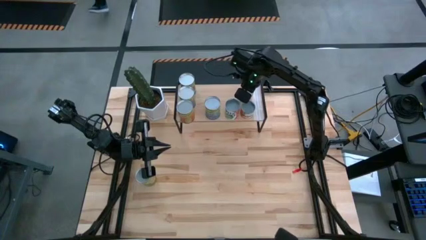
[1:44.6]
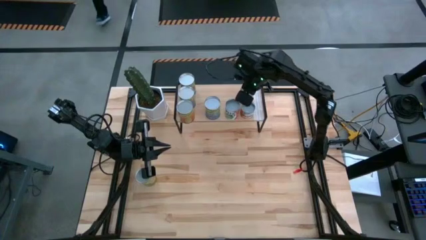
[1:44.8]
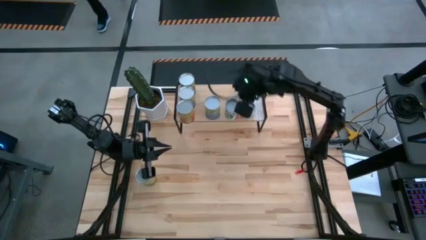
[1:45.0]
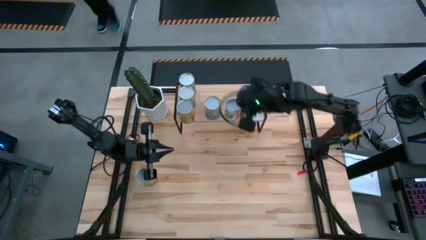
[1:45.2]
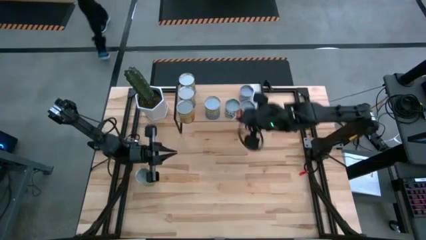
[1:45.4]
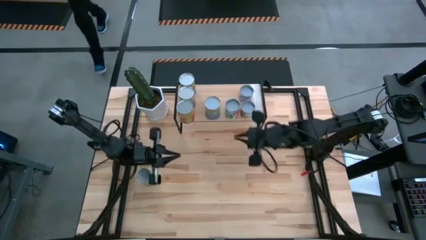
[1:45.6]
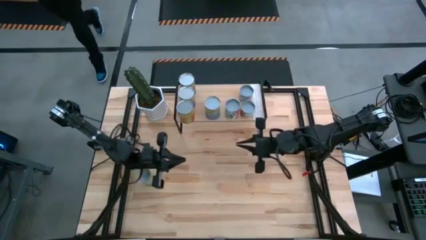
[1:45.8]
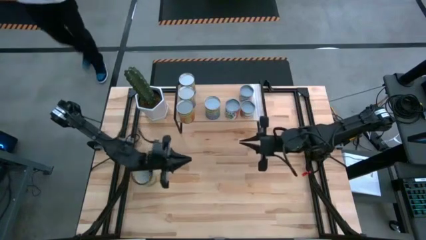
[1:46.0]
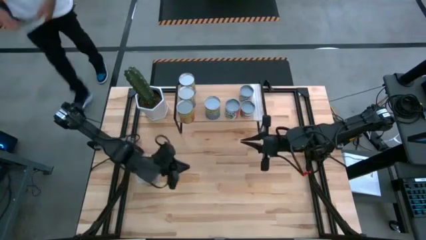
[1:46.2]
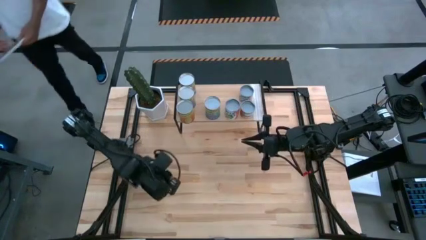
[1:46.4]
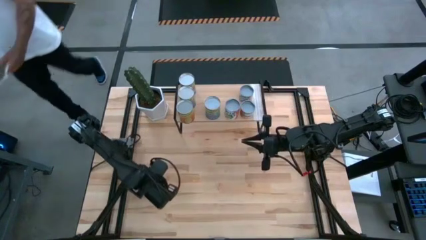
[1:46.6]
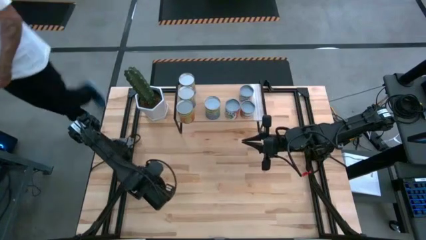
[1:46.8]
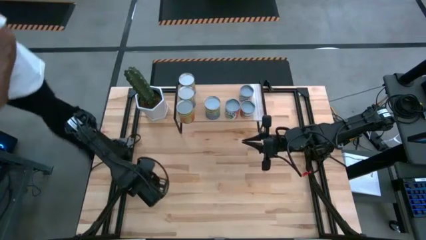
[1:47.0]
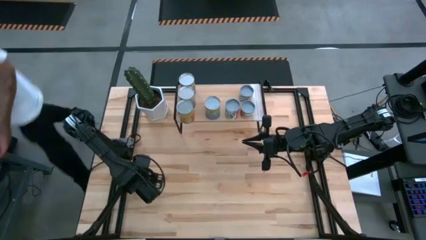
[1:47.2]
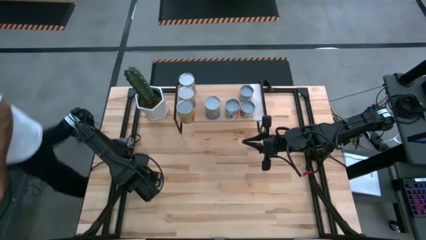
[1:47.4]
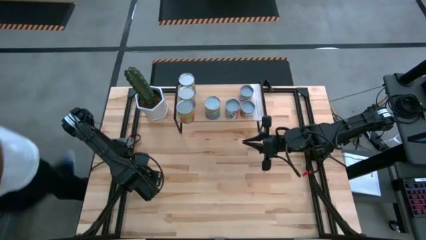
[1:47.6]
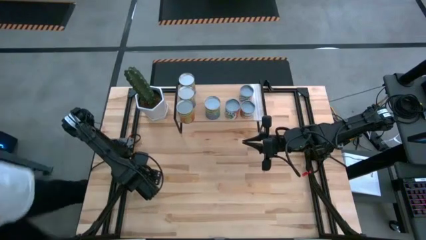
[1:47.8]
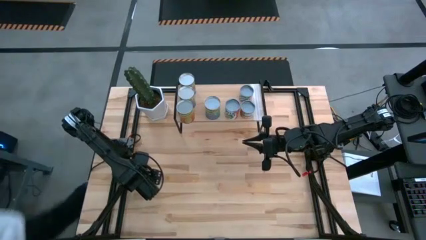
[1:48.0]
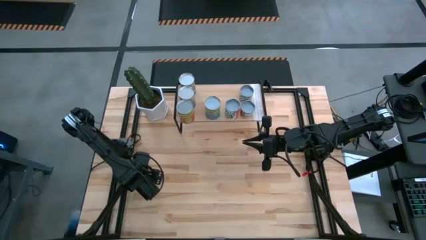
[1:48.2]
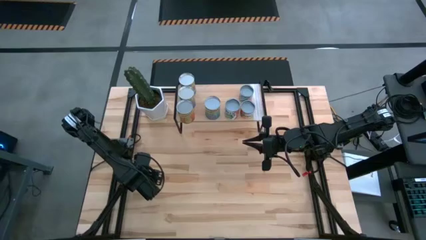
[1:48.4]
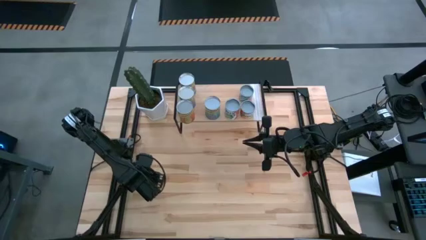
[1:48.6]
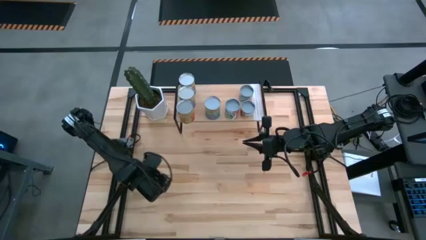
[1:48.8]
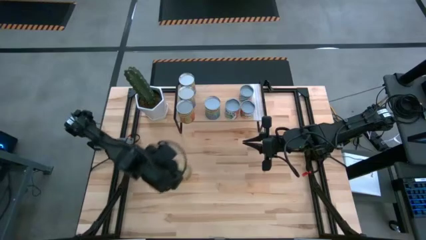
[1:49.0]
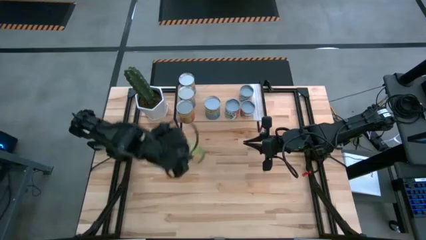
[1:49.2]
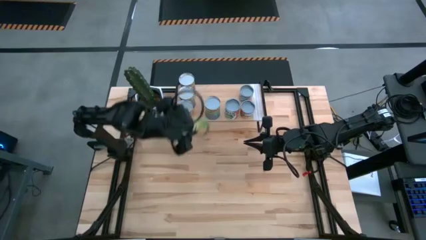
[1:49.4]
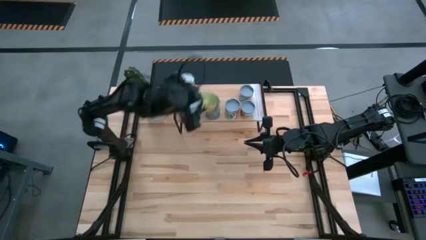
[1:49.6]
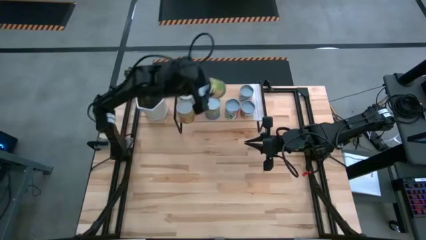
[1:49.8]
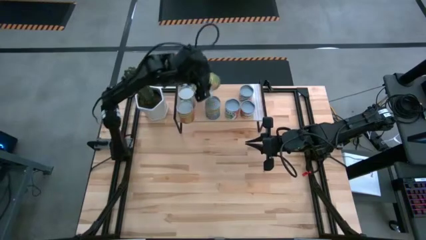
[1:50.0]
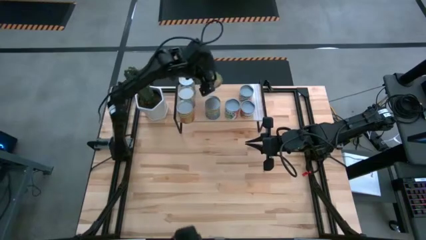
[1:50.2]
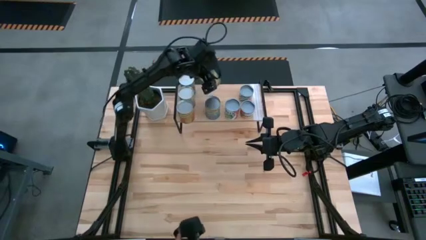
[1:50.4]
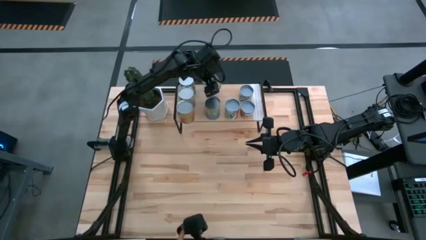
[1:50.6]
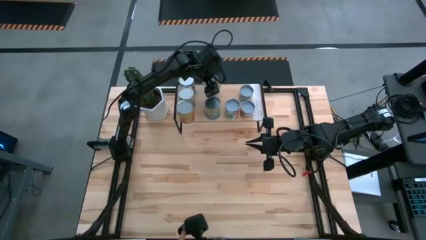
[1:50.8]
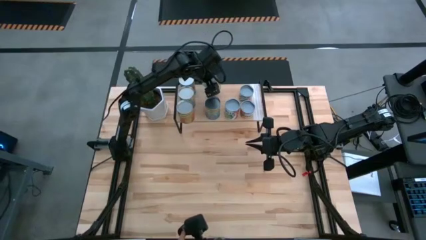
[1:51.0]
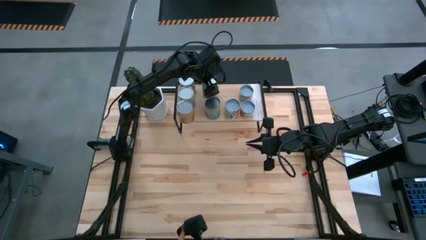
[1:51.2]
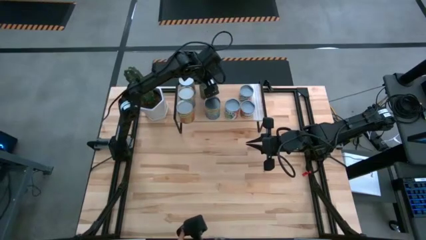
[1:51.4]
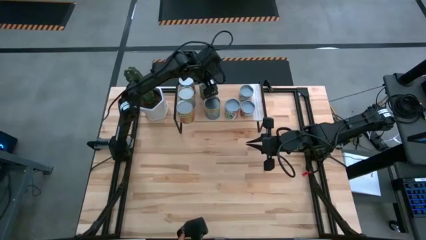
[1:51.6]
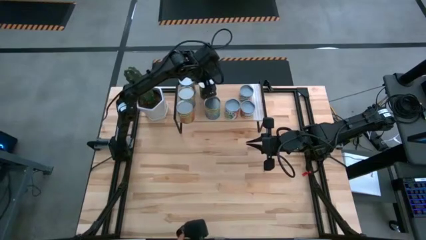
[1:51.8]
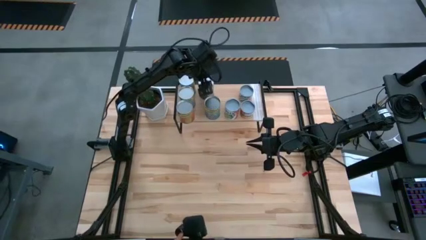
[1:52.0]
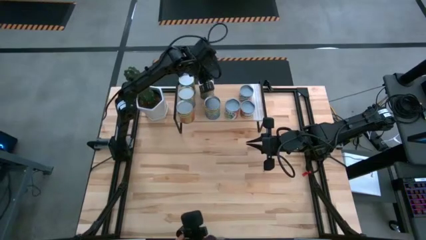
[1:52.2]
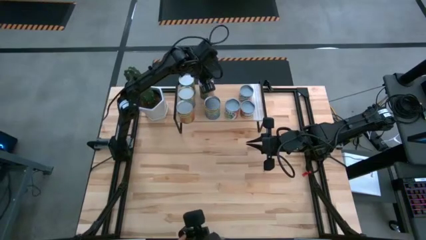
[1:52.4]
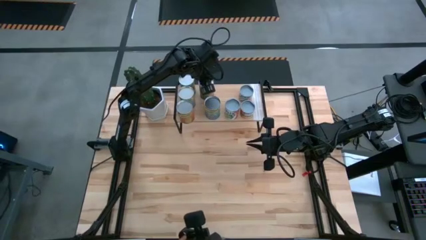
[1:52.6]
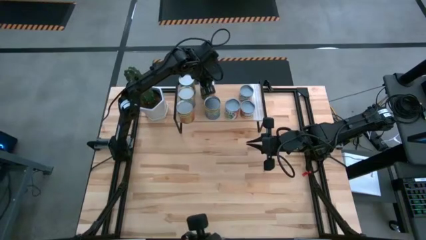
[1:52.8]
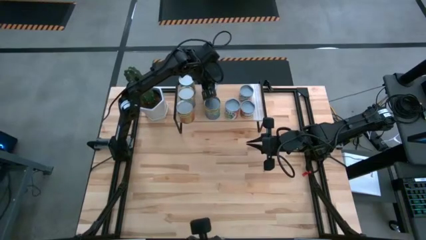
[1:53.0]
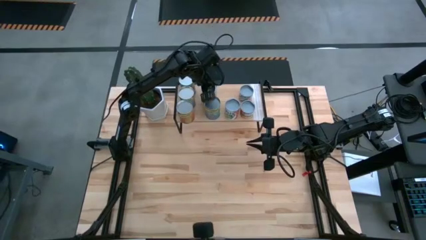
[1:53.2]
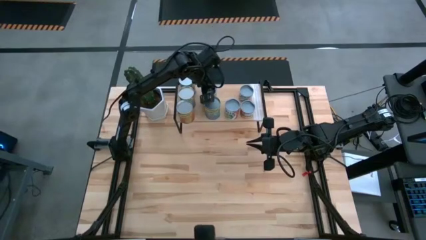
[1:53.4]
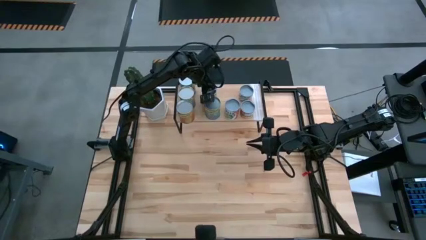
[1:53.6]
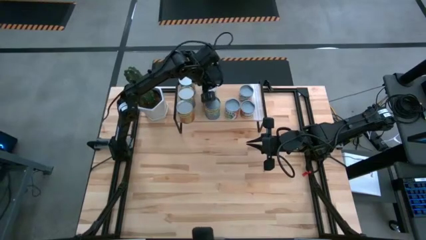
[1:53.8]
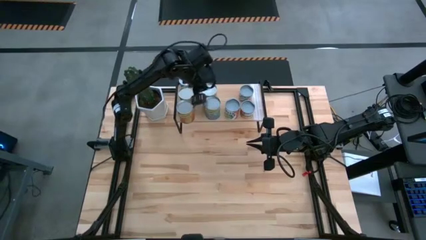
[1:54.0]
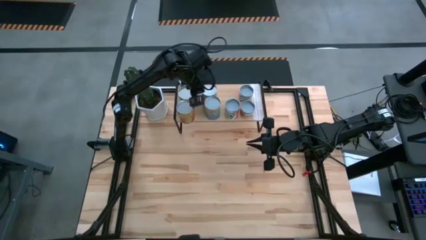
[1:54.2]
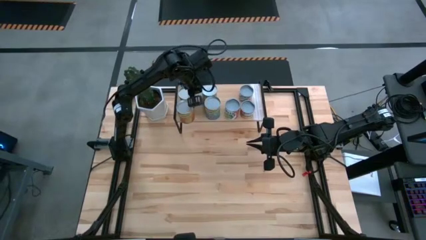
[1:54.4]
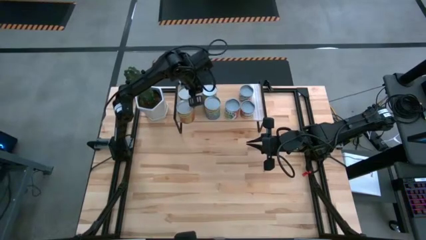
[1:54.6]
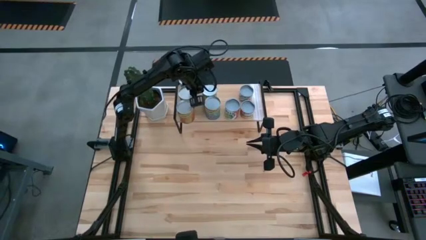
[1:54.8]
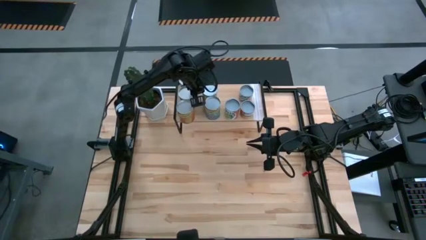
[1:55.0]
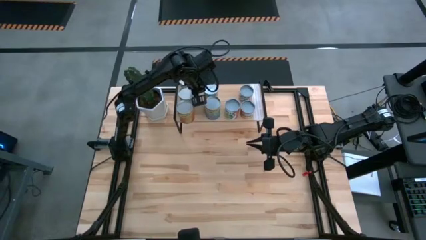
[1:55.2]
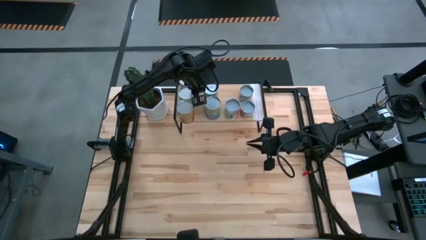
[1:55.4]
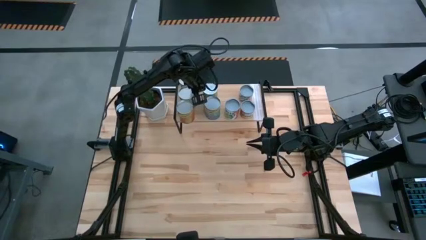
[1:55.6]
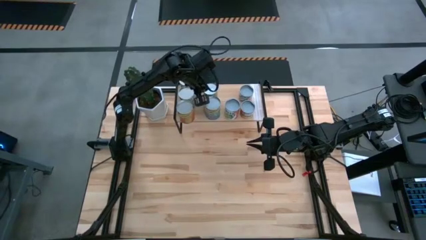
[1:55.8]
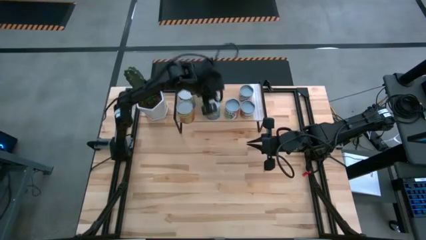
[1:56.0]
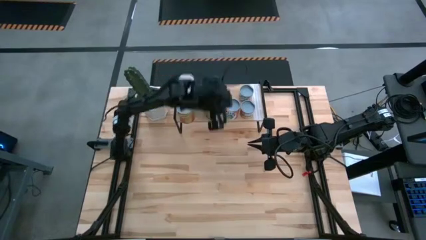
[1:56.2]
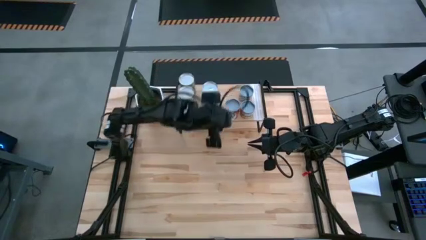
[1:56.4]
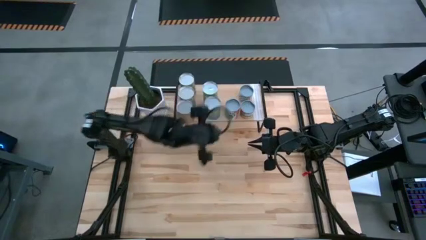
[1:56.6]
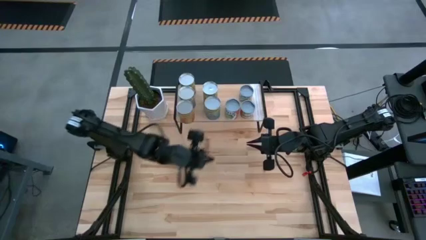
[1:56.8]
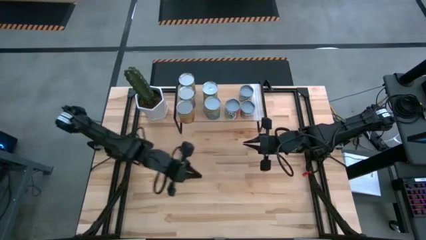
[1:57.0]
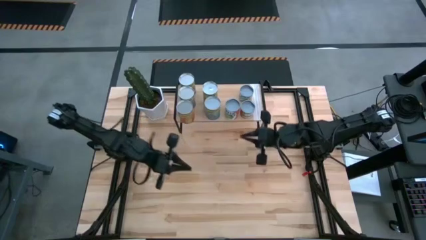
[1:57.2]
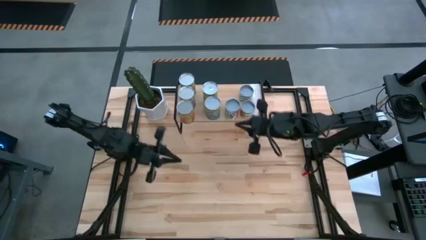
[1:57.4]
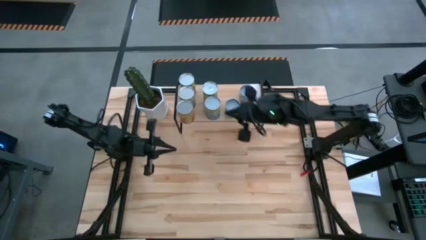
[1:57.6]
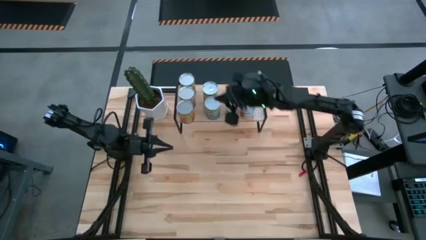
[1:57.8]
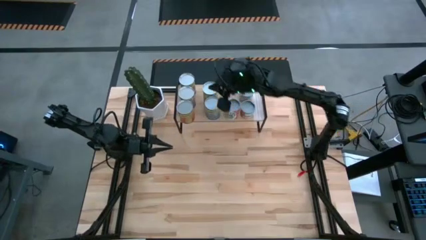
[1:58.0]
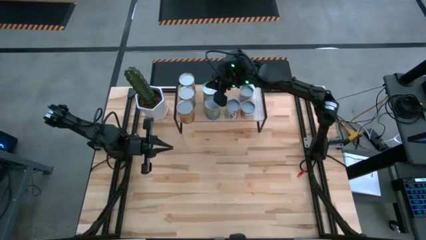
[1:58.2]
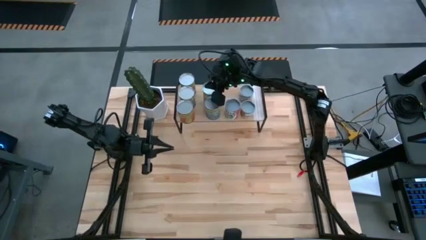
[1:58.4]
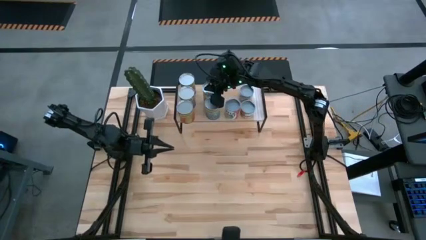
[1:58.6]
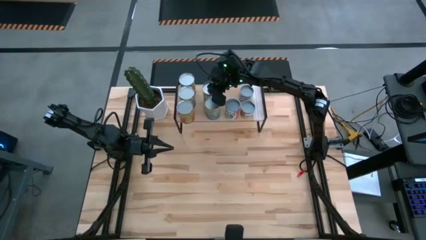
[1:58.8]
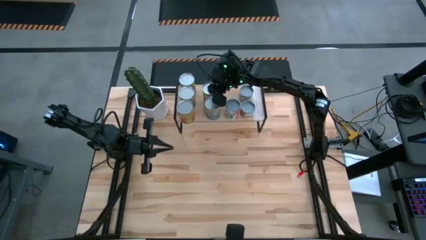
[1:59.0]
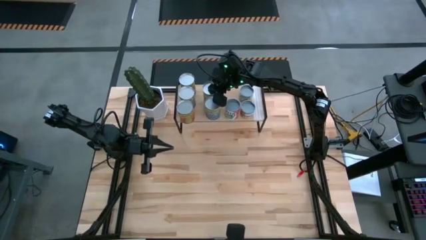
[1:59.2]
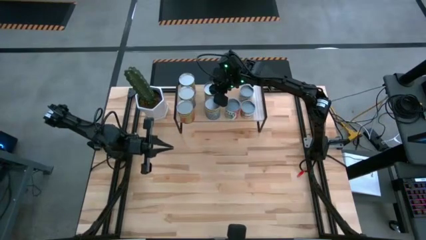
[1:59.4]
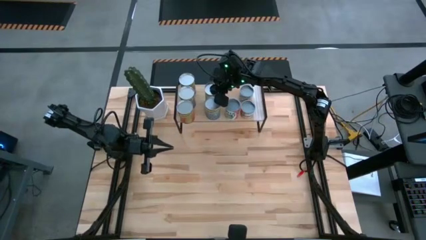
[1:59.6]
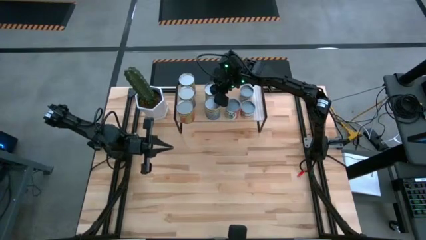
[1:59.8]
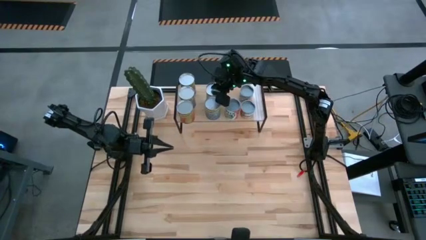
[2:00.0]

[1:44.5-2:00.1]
Task: Pick and place cans onto a shelf
Put the large canned oranges on the shelf

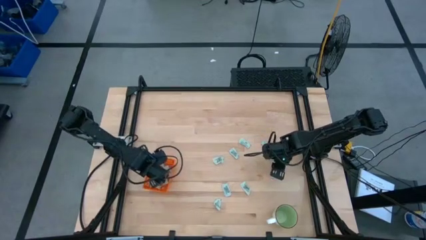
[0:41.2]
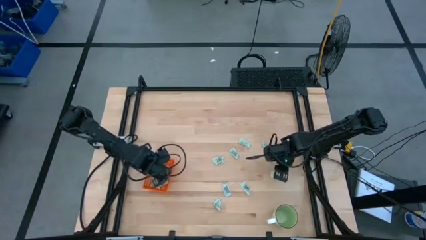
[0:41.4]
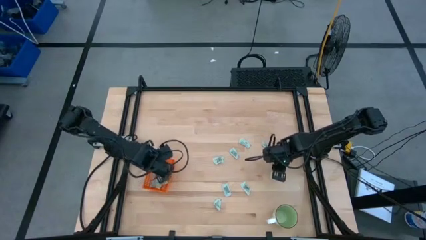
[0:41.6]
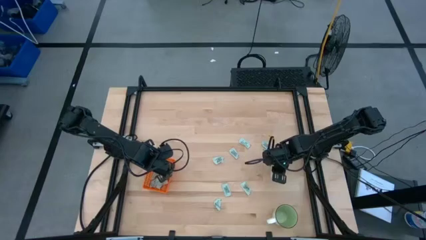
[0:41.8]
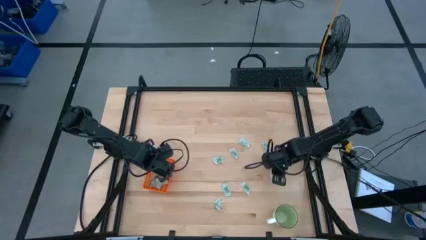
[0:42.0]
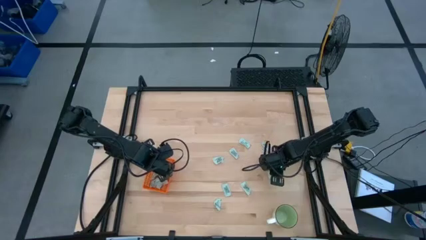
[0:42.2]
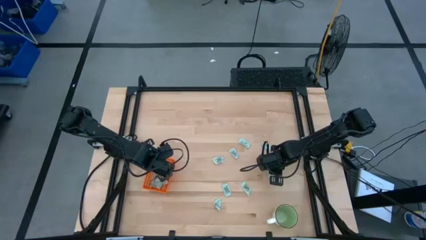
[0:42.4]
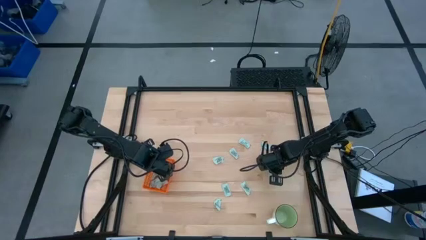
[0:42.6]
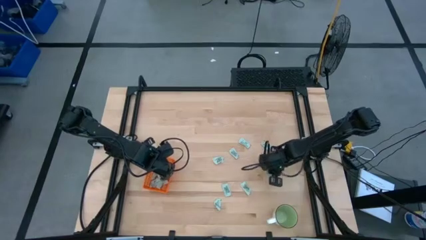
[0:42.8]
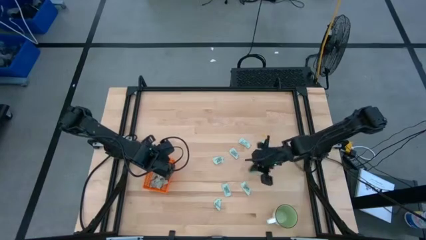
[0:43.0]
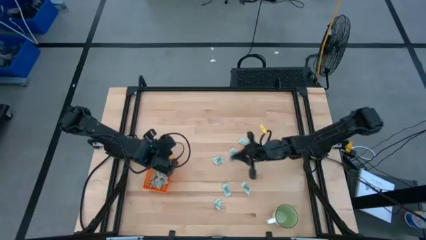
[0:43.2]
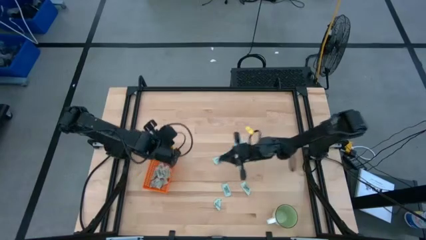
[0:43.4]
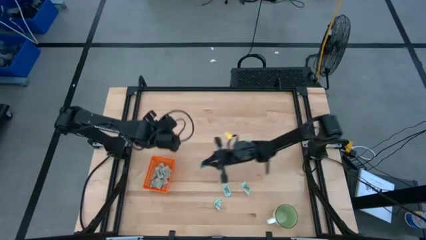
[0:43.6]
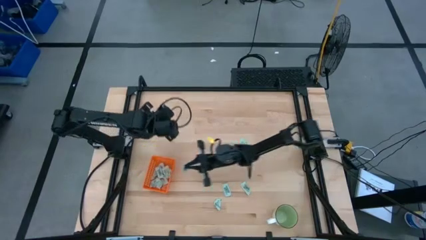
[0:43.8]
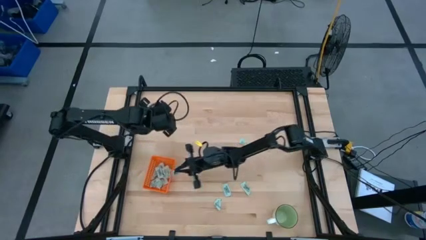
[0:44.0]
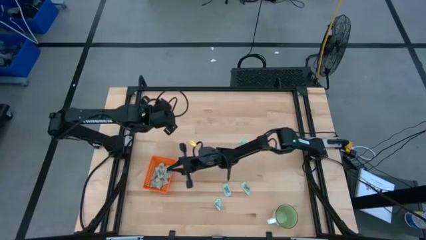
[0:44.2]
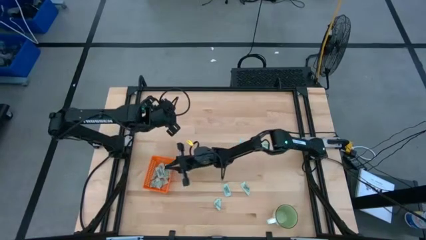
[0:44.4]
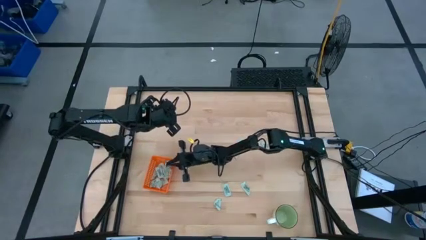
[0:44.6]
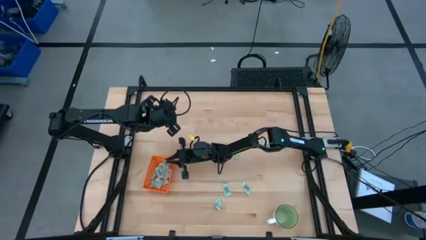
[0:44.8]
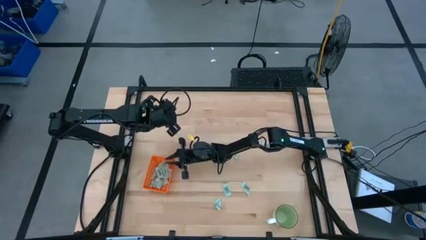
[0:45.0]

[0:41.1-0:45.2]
Task: Pick and place Stevia / Truvia into bins
Put the white stevia packet into the orange bin
